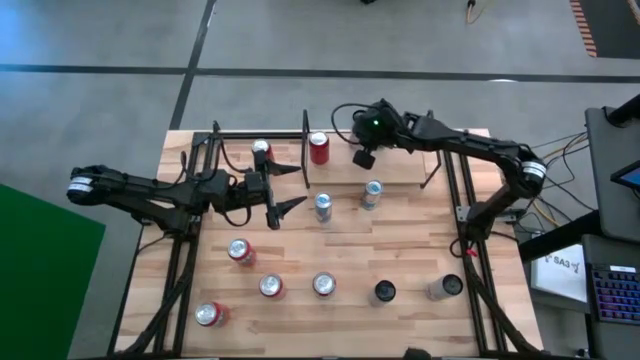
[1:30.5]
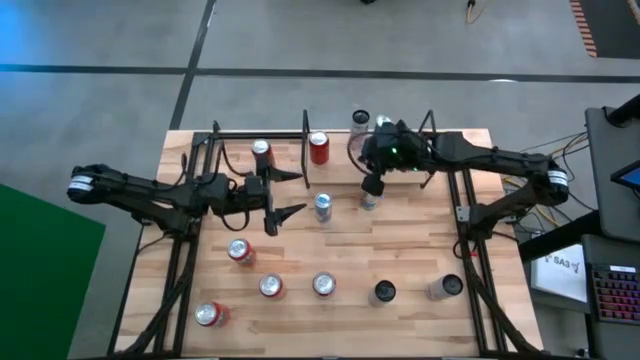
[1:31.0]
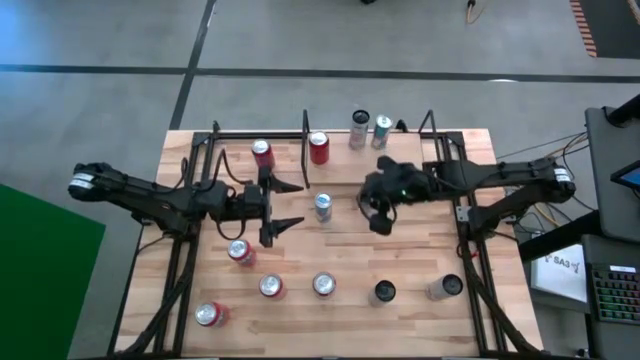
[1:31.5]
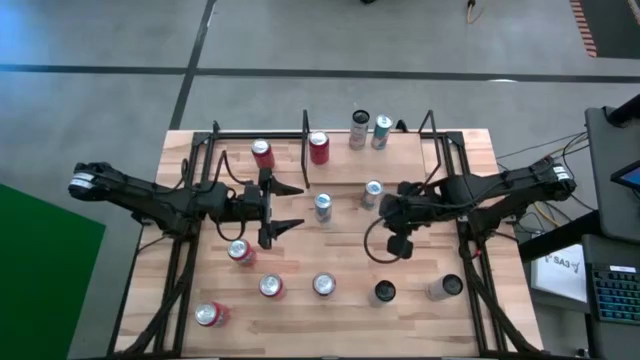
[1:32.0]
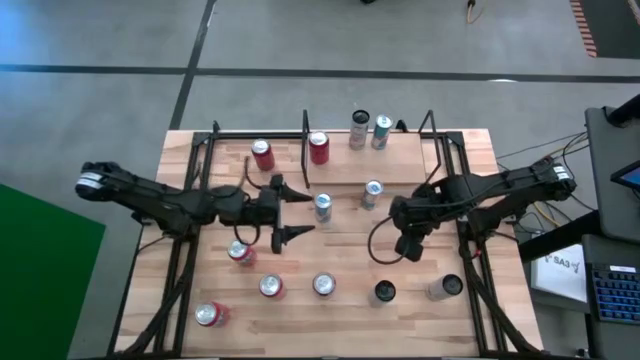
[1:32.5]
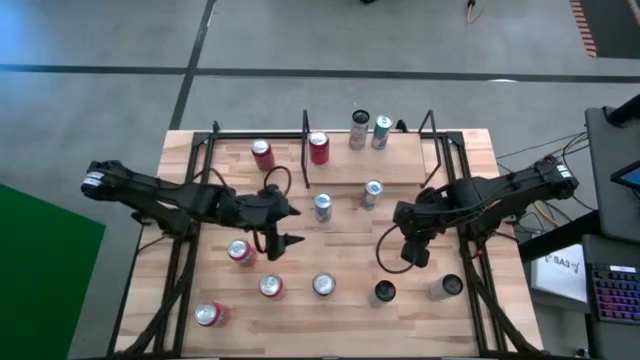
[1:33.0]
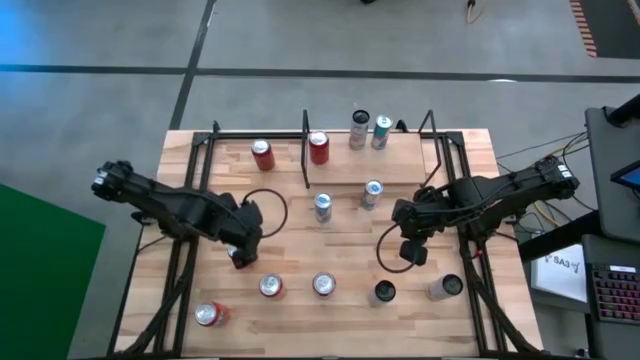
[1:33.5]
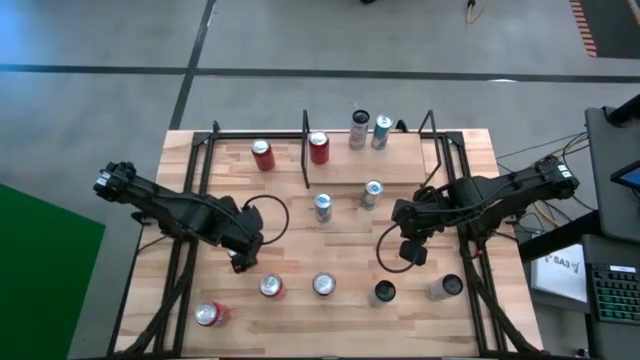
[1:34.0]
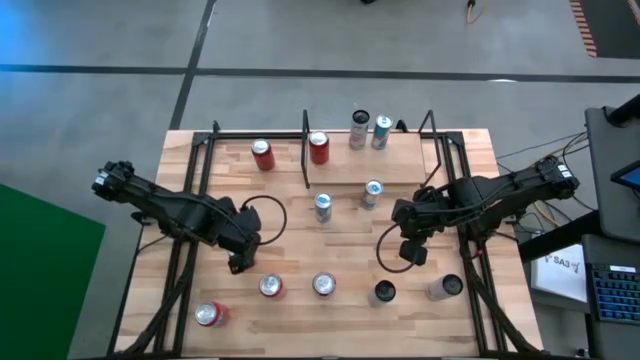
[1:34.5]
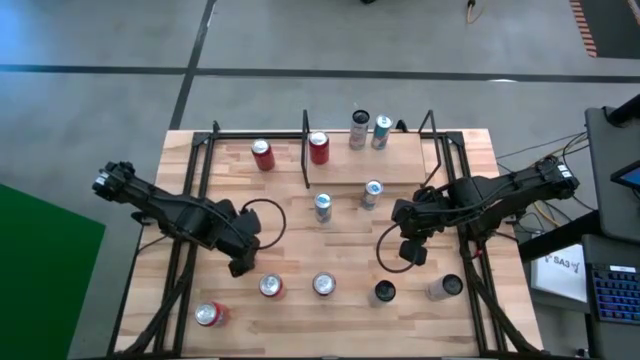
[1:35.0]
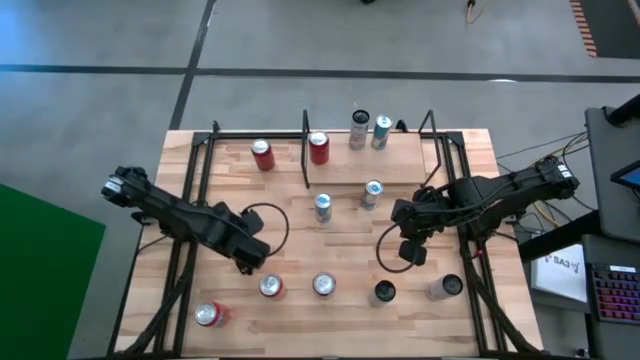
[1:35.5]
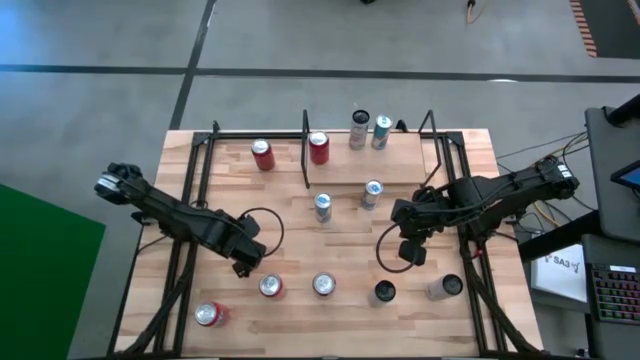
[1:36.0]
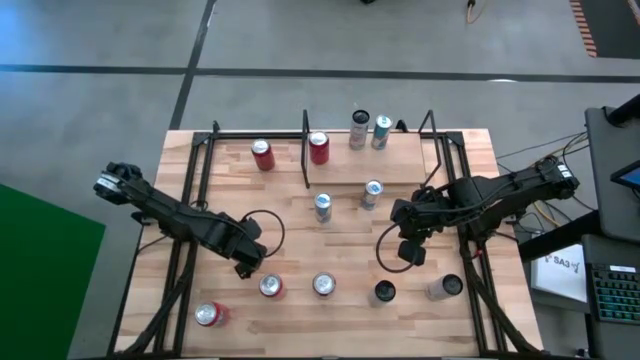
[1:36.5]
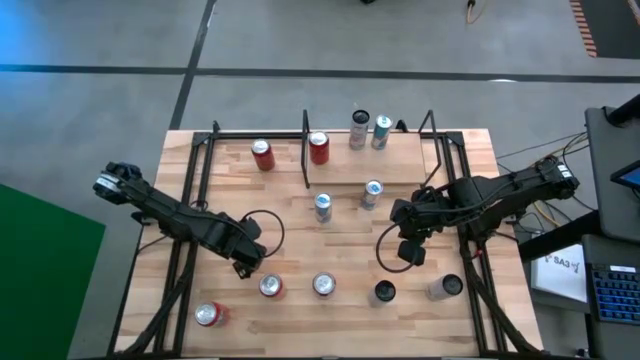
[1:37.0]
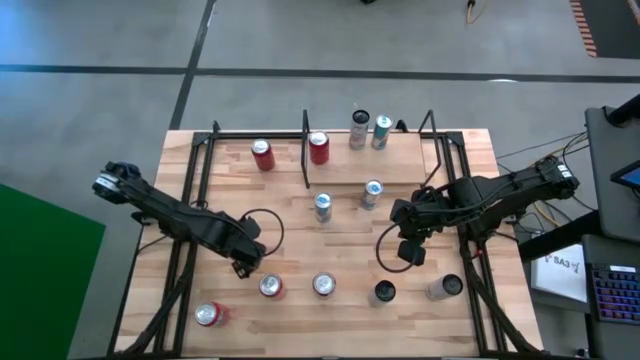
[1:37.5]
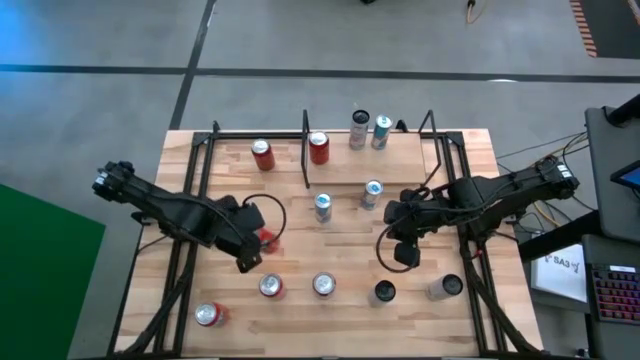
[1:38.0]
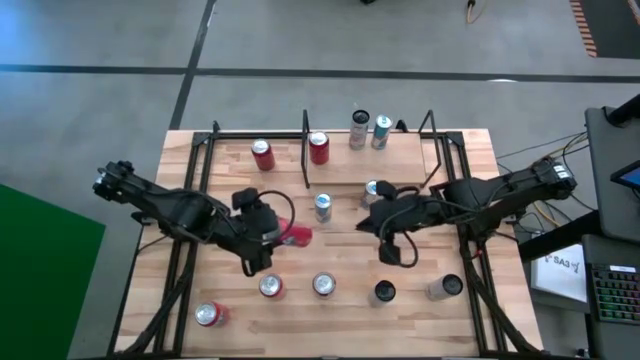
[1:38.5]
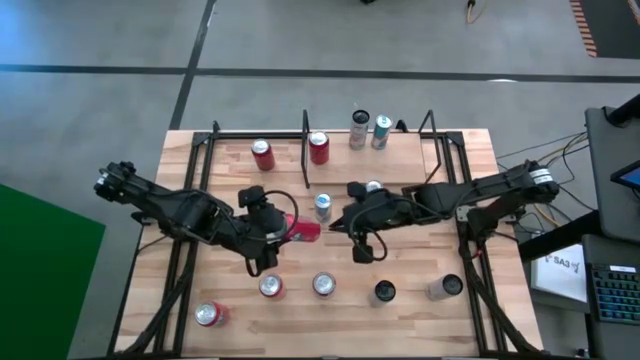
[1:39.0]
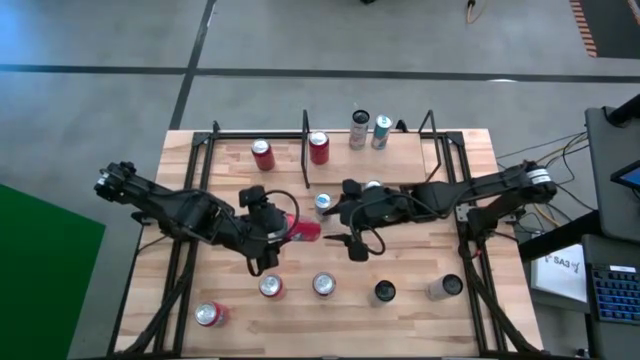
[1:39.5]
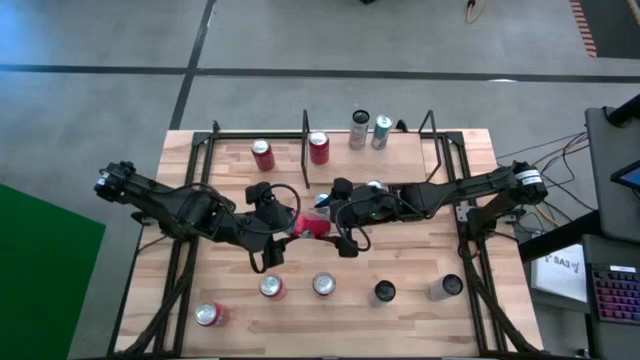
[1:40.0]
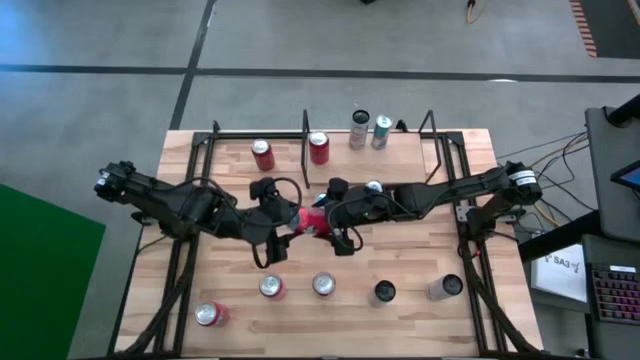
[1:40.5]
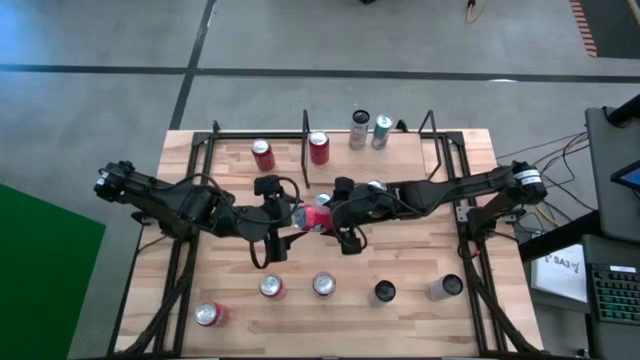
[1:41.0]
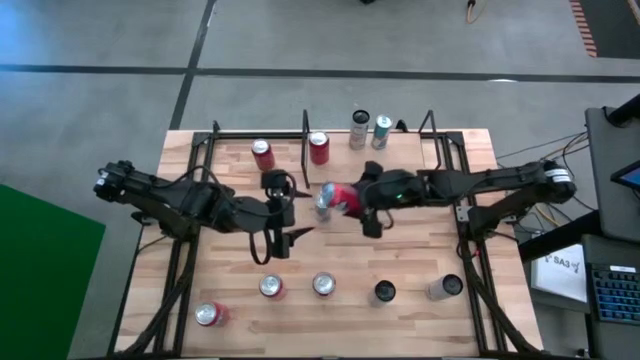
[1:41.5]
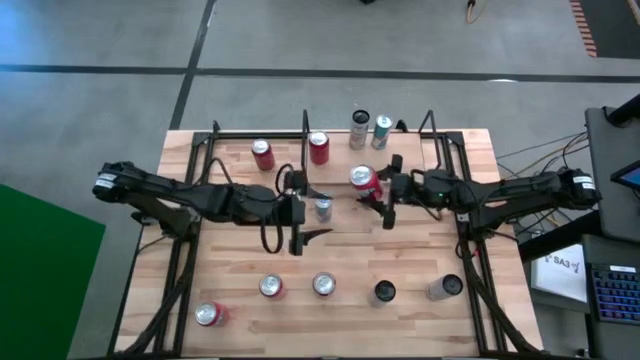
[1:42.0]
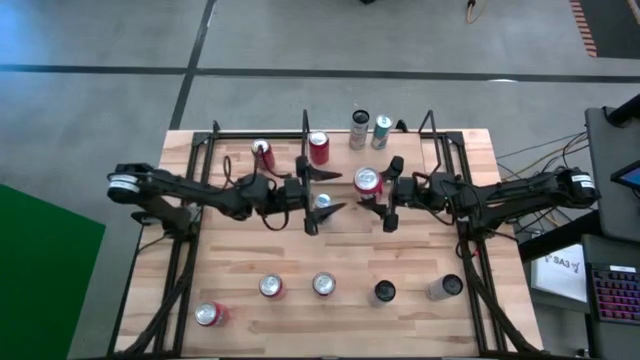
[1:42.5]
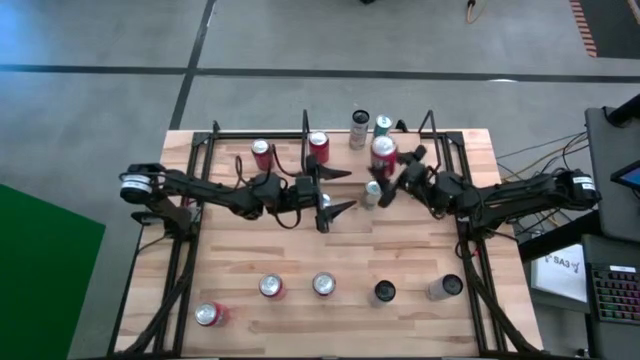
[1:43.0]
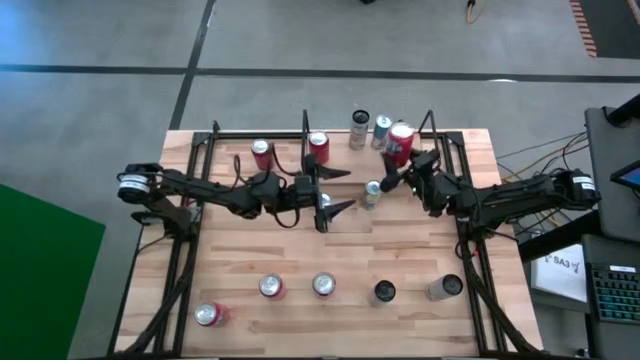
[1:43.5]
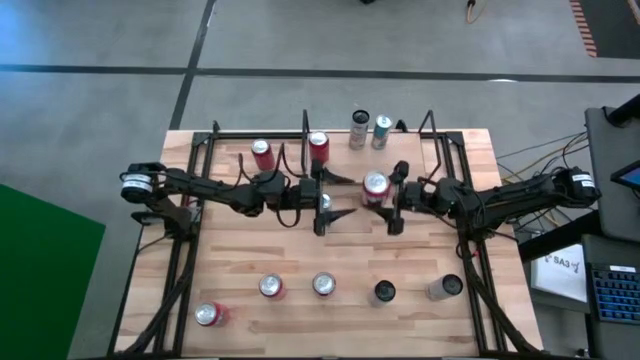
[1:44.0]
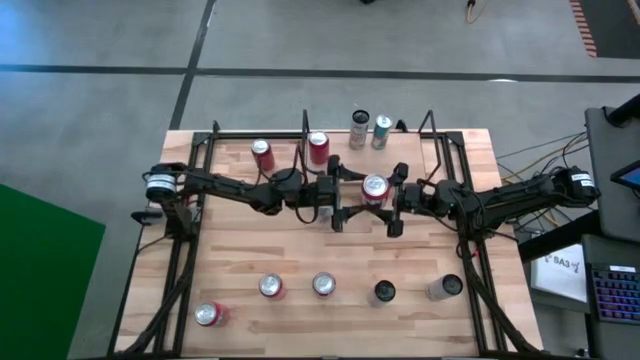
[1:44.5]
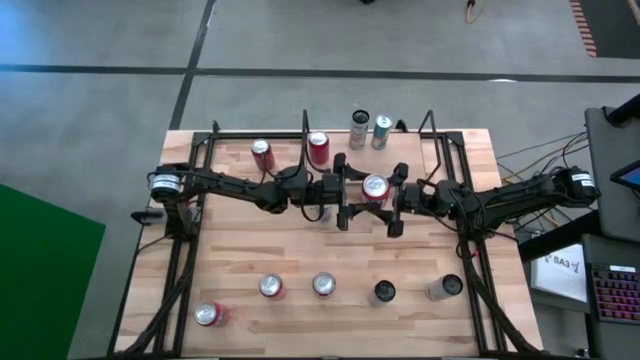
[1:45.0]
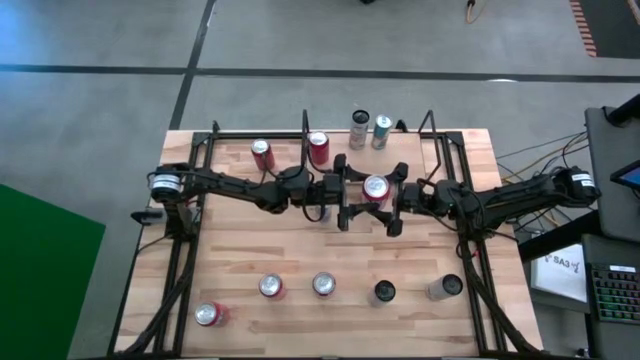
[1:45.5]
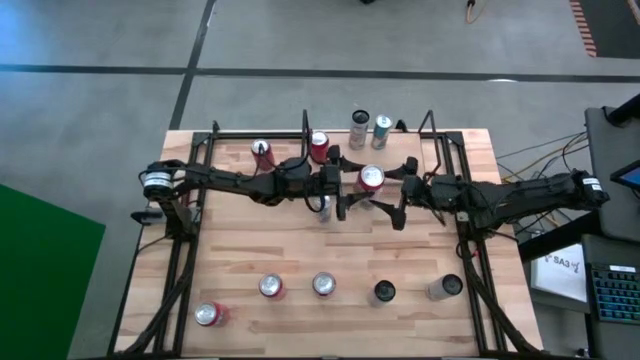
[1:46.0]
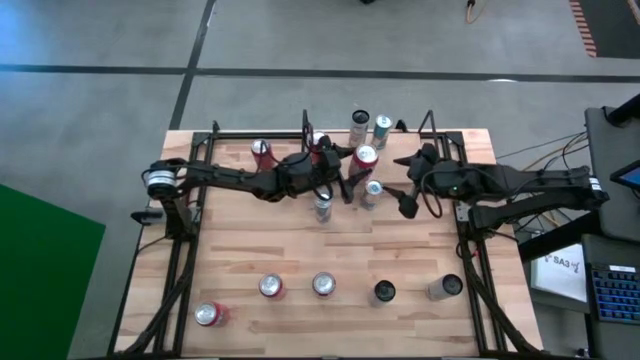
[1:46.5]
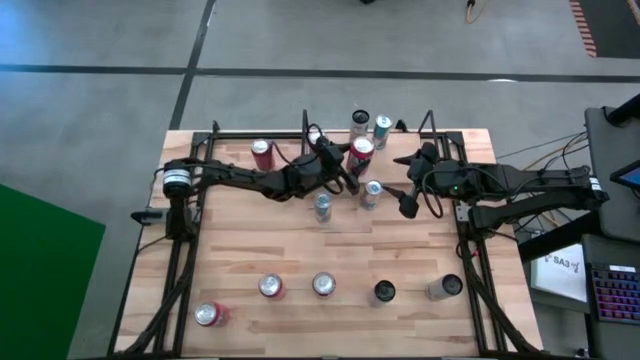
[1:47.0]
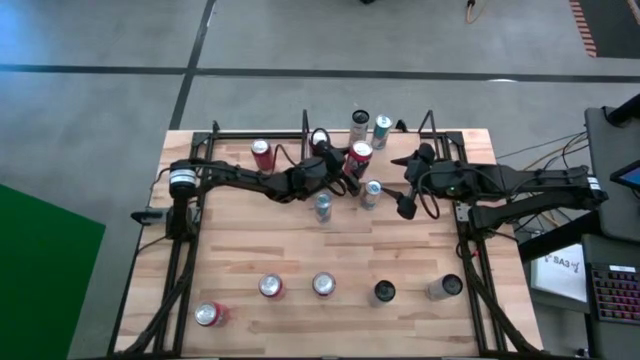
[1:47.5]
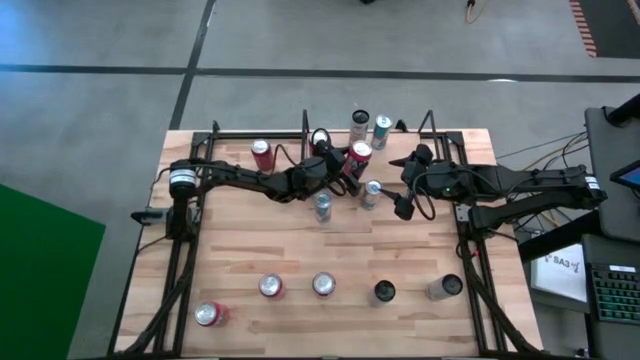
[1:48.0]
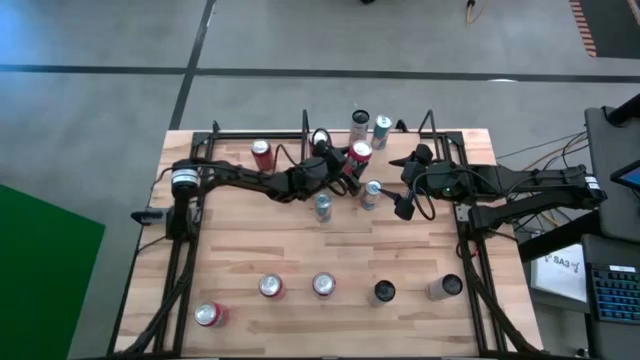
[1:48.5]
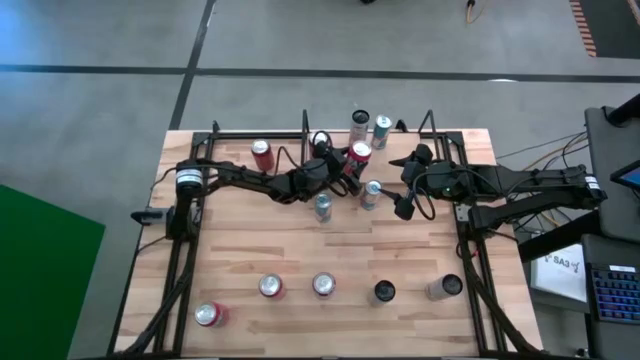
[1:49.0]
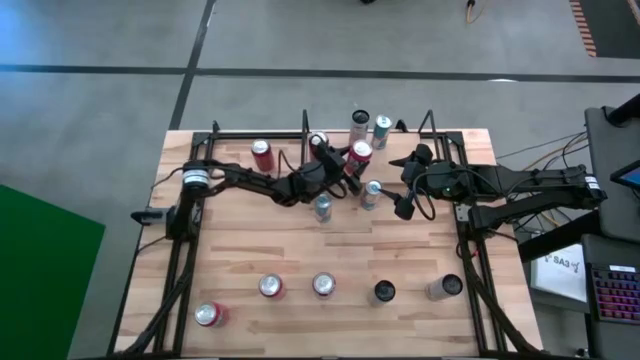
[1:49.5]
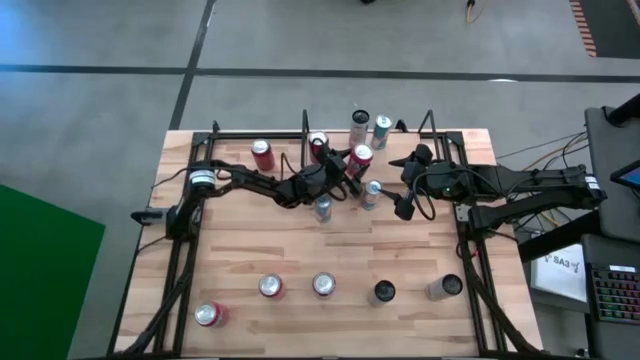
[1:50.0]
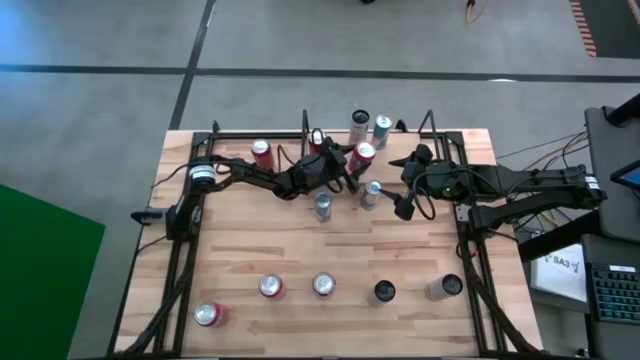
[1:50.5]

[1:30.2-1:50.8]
Task: Place canned beverage on shelf
Put the red soda can on the shelf

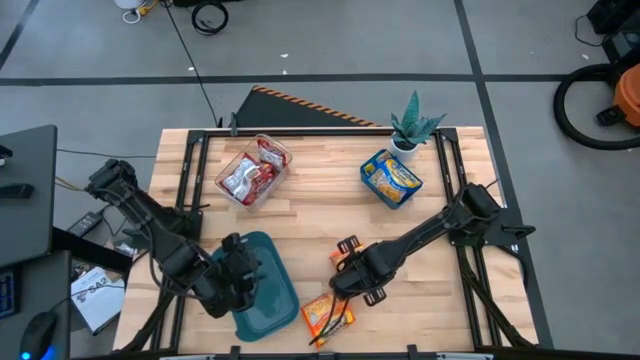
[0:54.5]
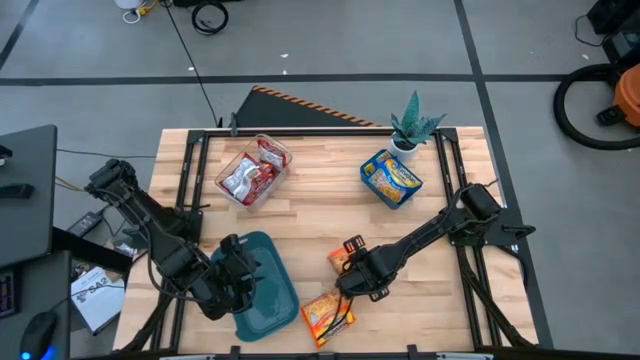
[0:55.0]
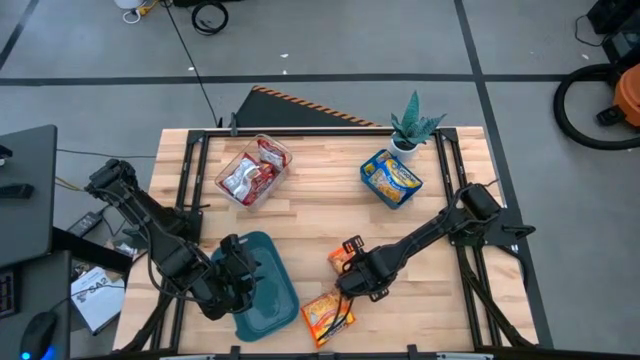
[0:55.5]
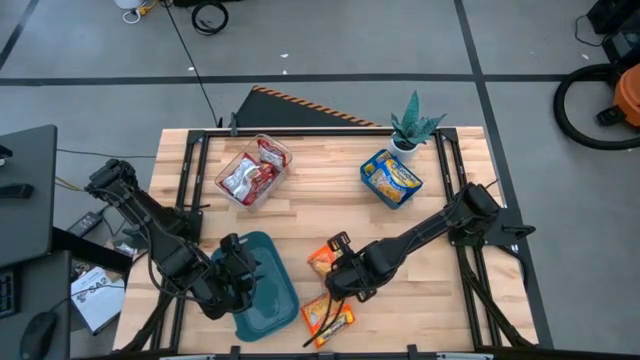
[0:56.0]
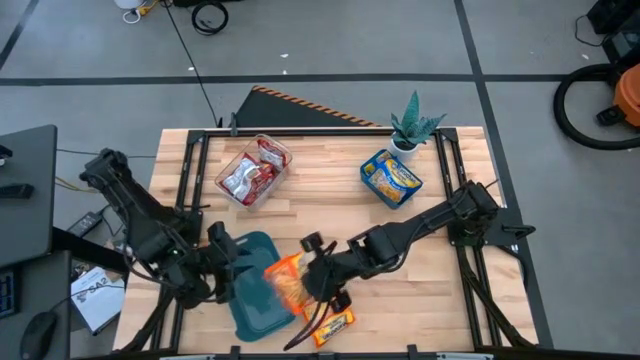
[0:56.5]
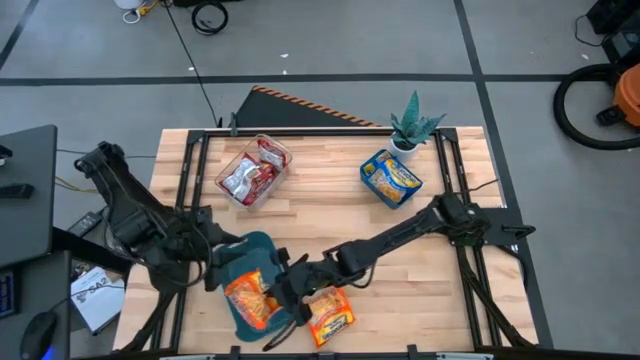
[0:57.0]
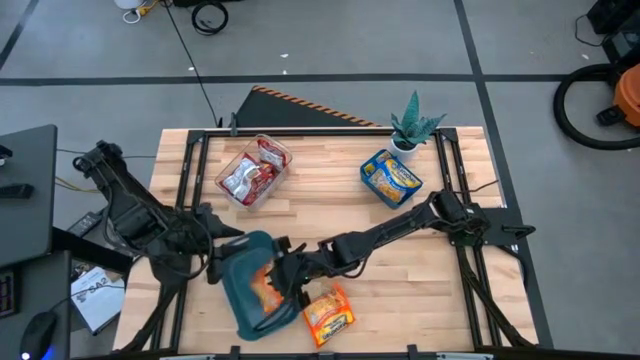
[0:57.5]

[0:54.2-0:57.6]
Task: Sort Maruchan noodles
Put the orange noodle pack into the dark blue bin
